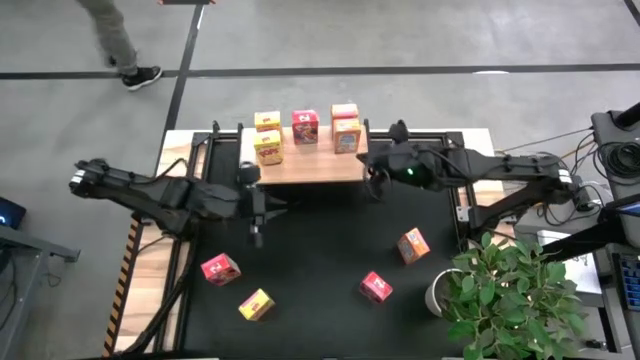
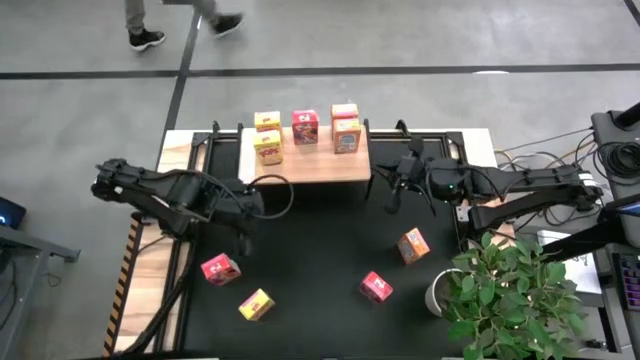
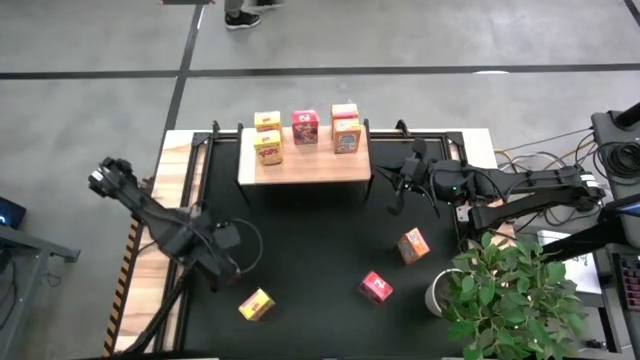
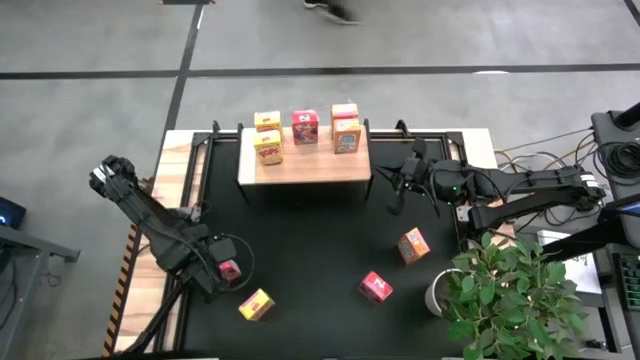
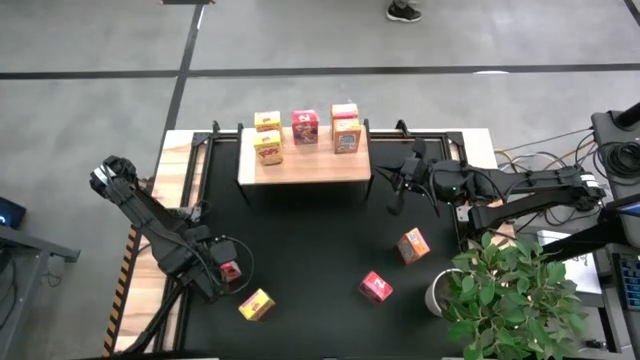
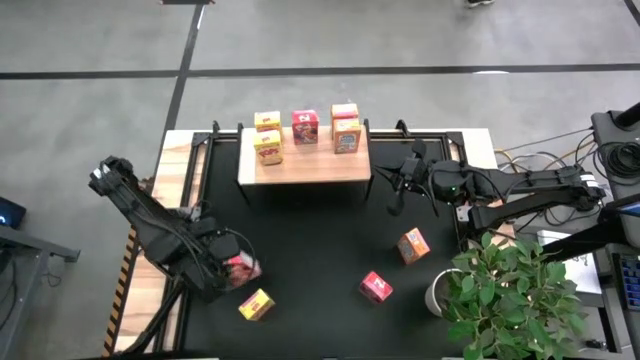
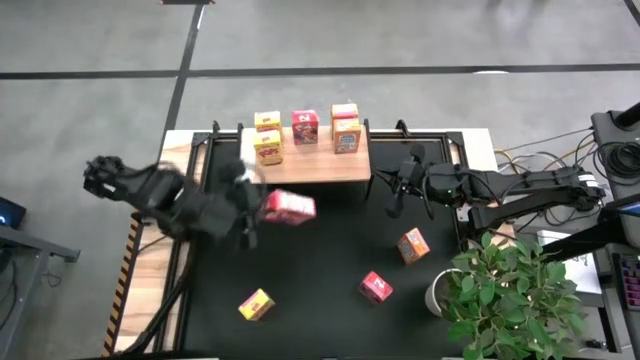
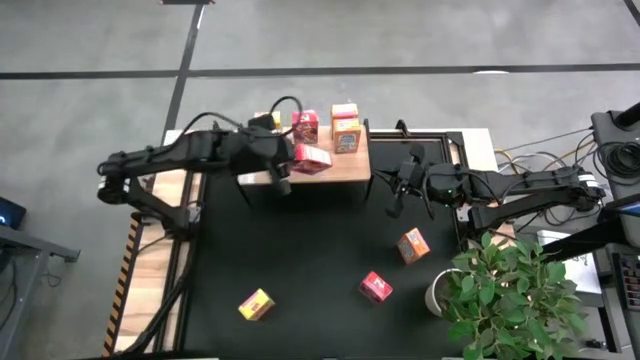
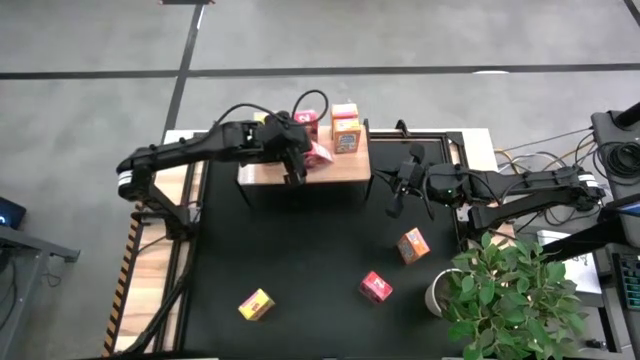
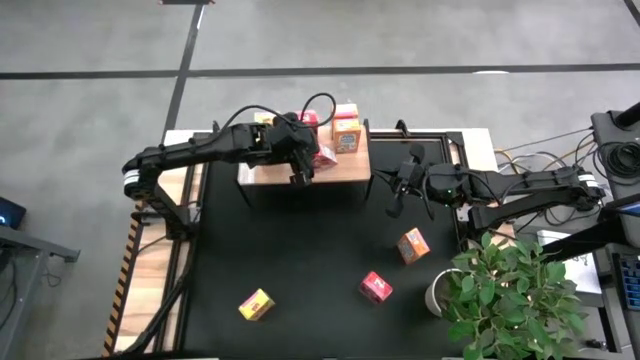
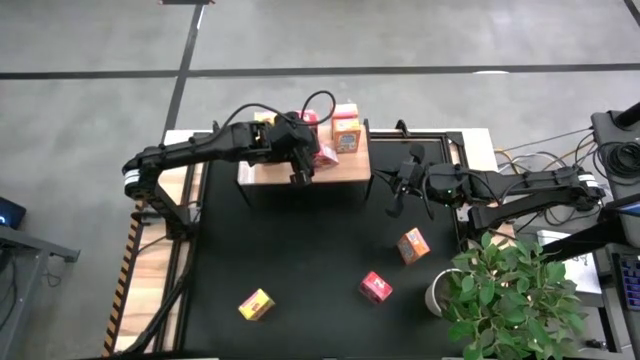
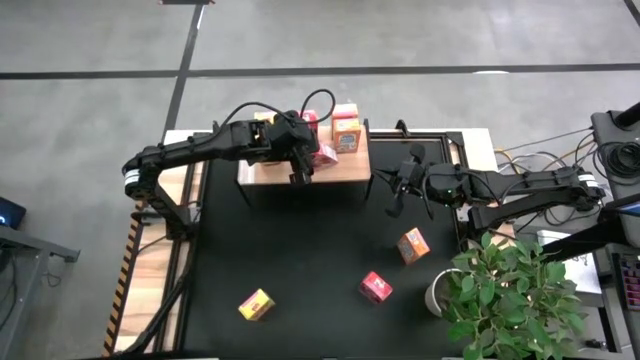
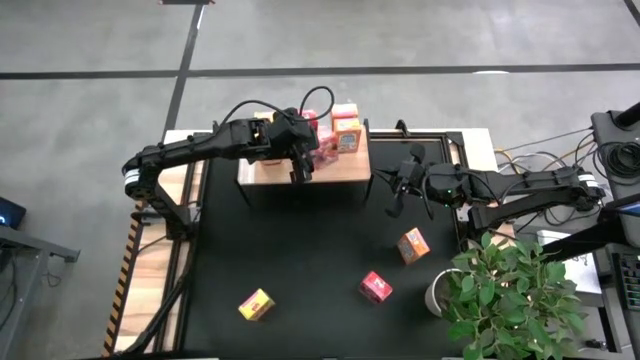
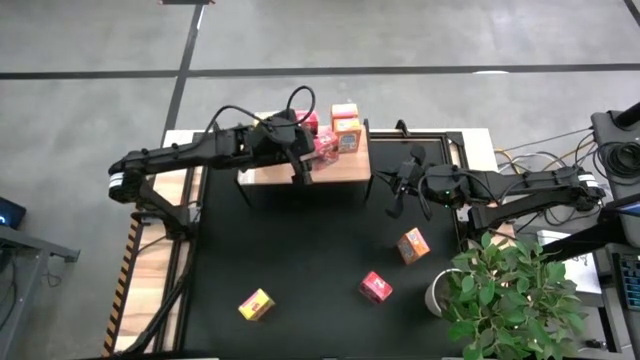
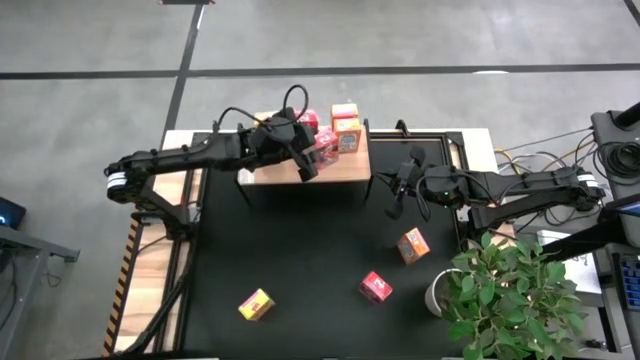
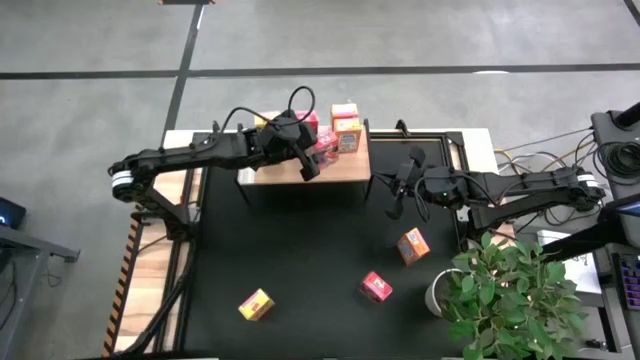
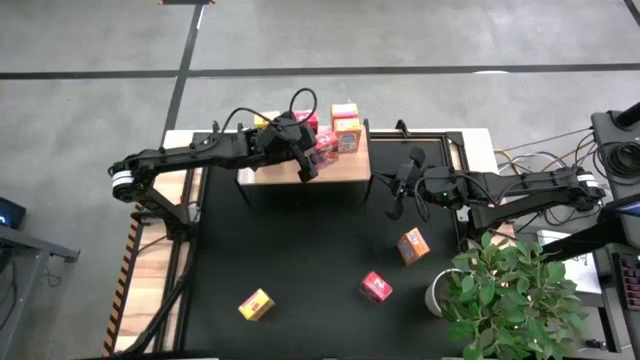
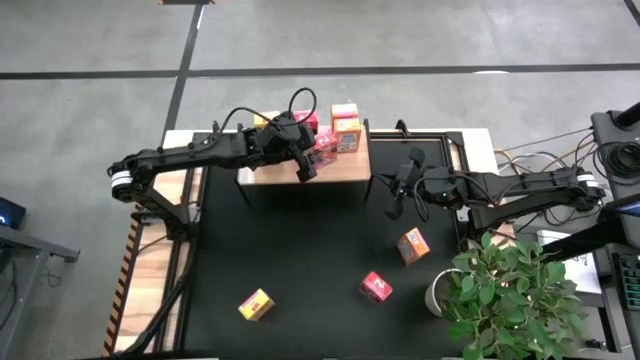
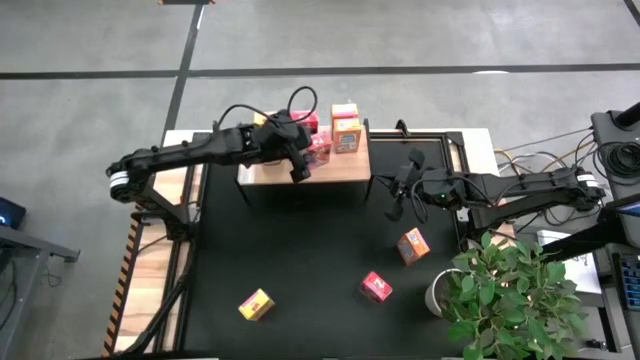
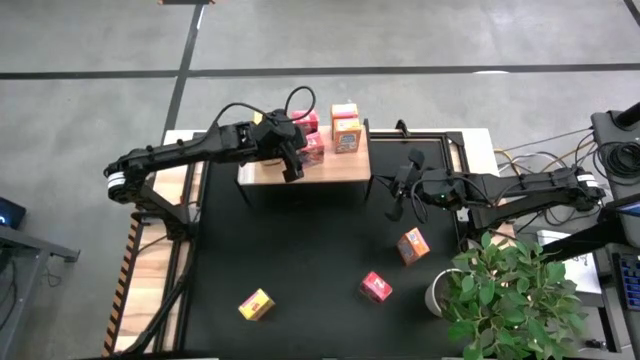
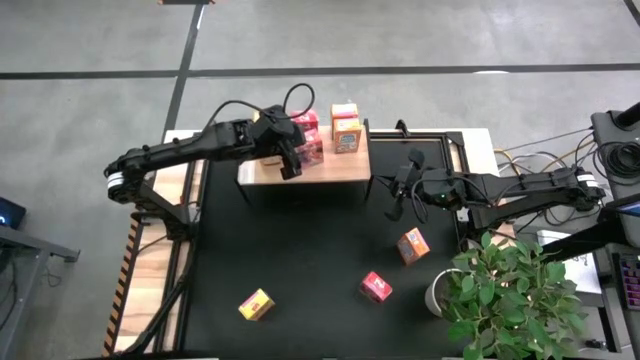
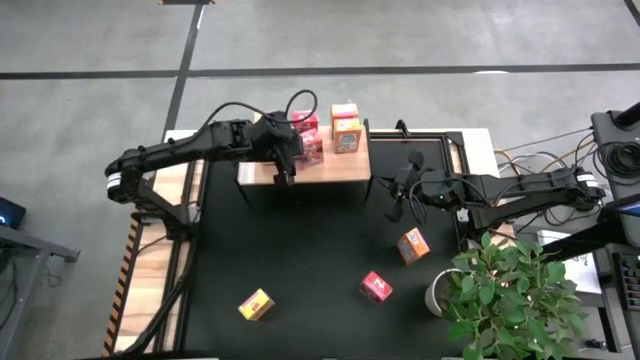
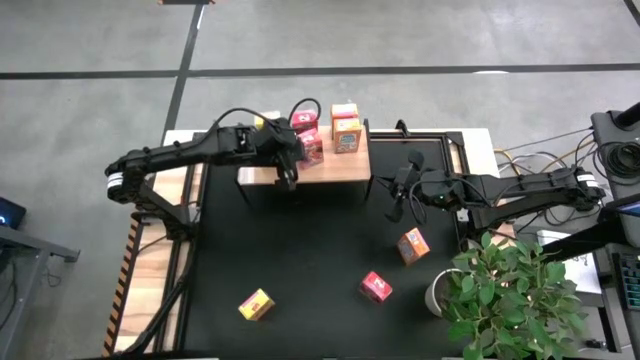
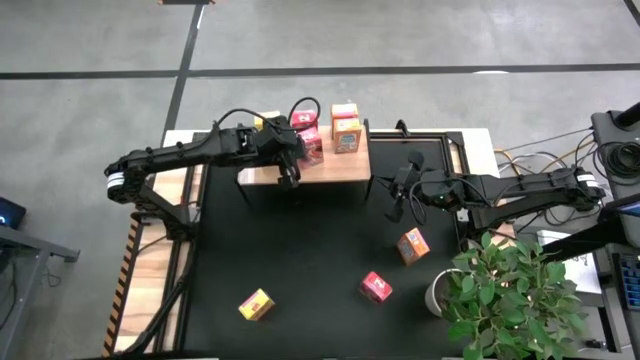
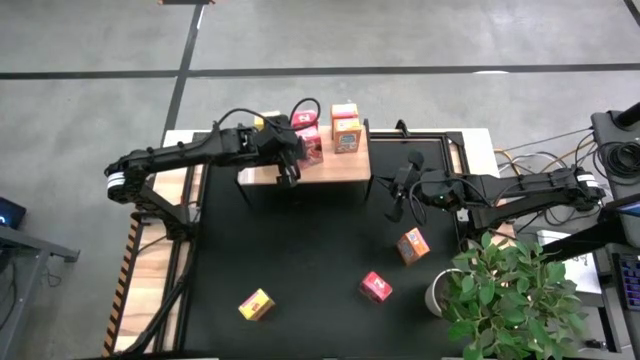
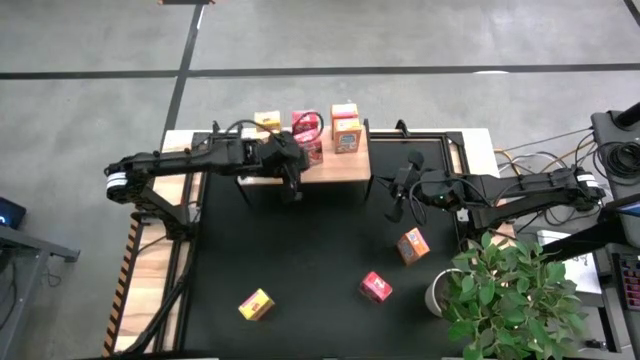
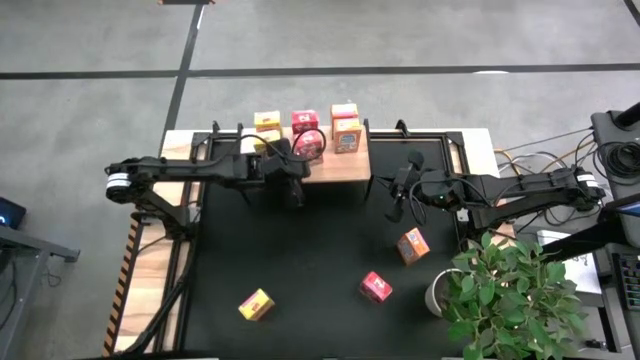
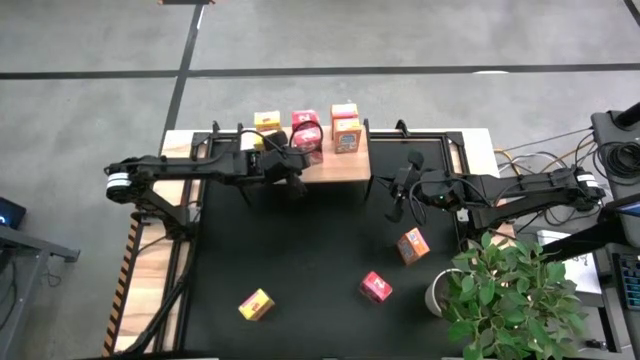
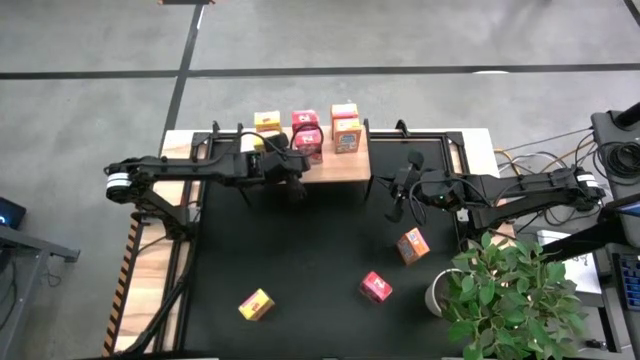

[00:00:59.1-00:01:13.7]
Task: Stack cereal on shelf
Put the left red cereal box aligned with the other red cereal box on the shelf

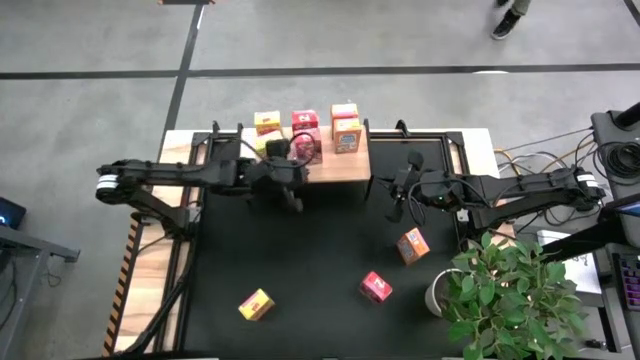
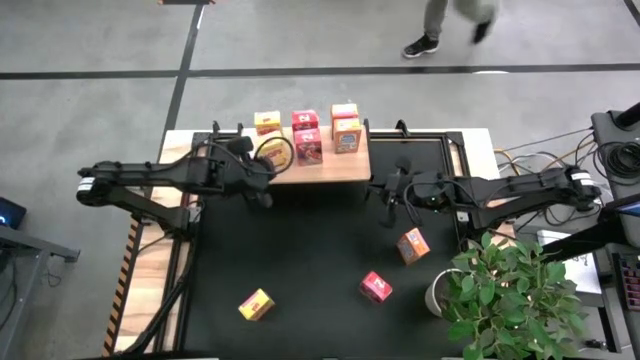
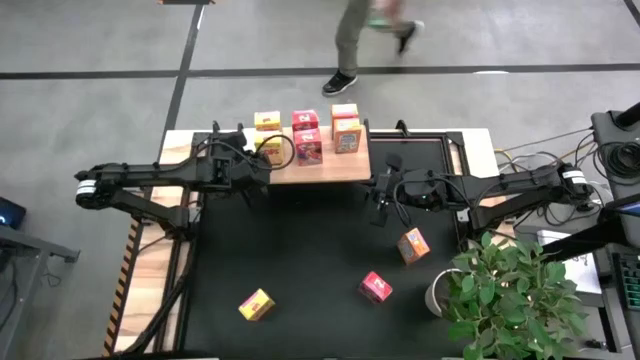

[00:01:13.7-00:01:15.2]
Adjust the yellow cereal box on the shelf

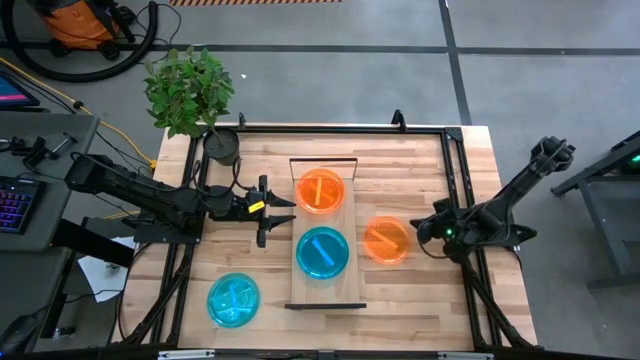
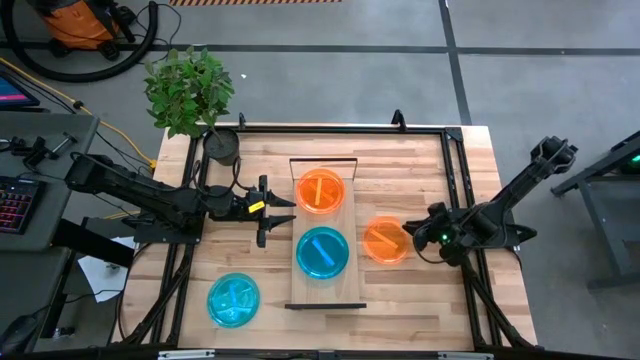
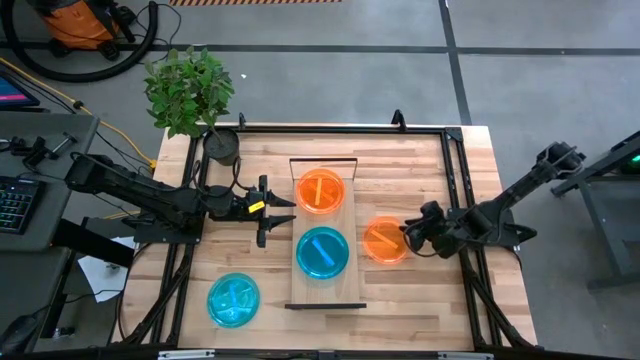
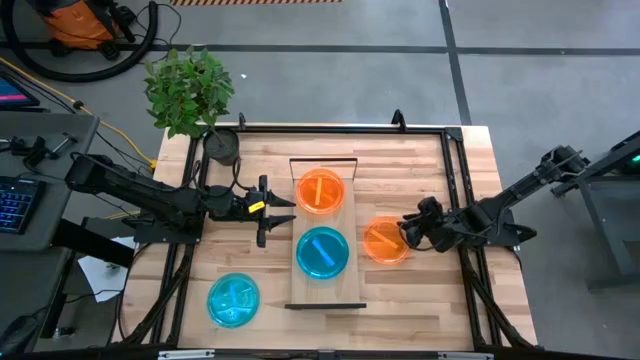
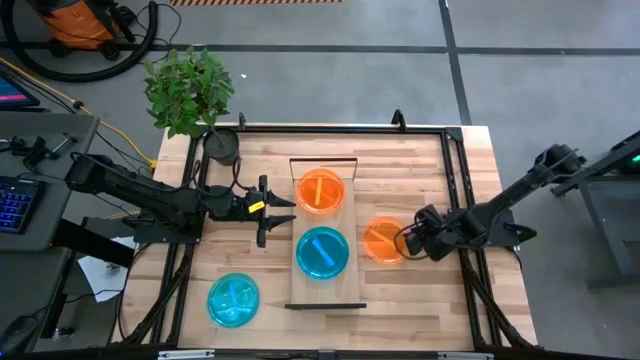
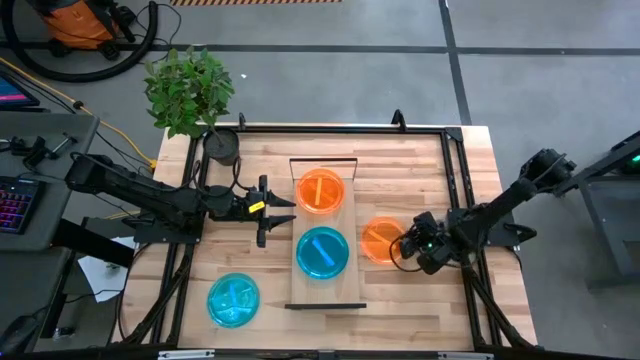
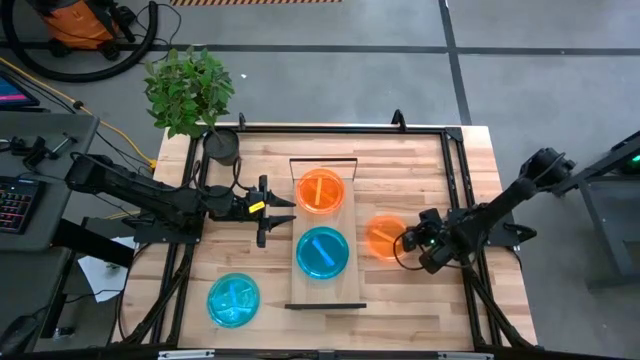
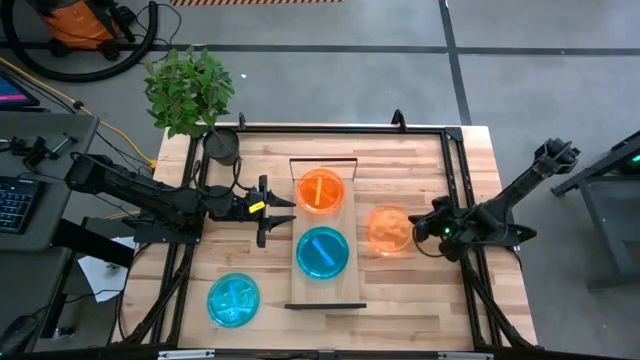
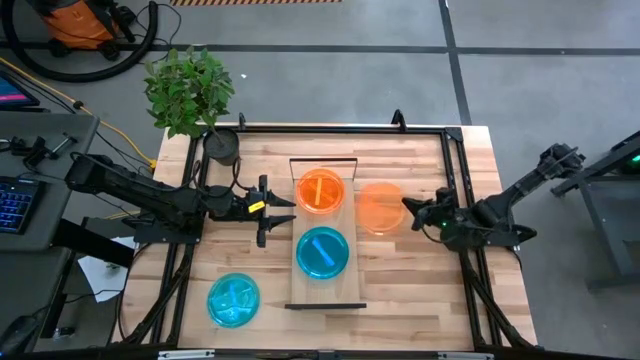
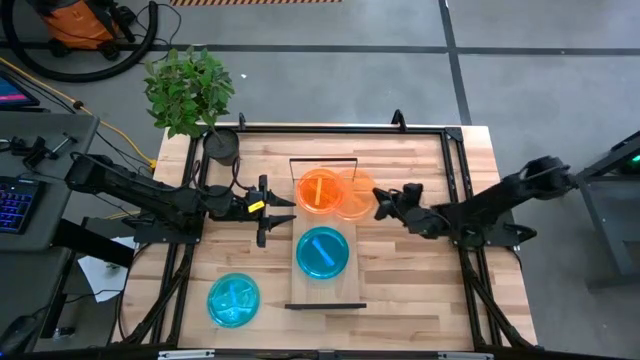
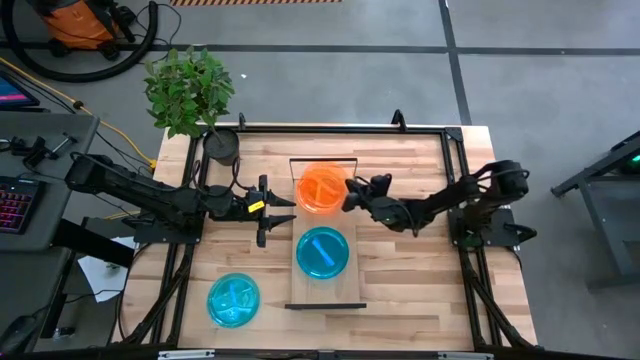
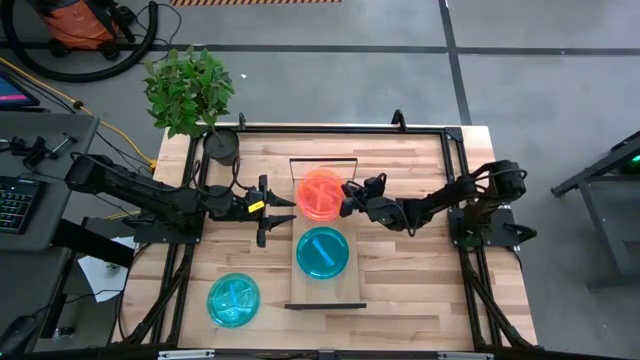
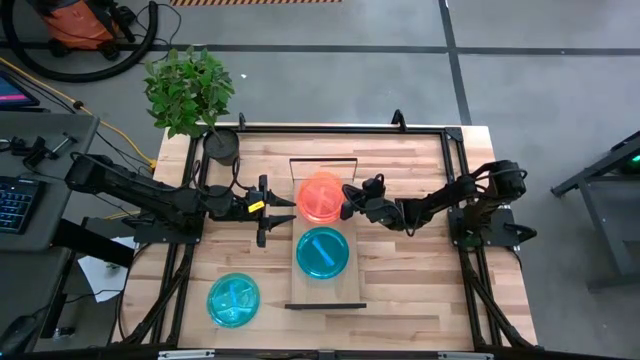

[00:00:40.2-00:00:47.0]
Task: Place and stack plates onto a shelf
Stack the orange plate on top of the orange plate on the shelf
